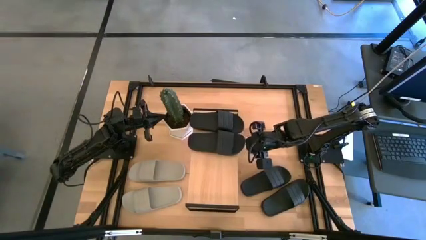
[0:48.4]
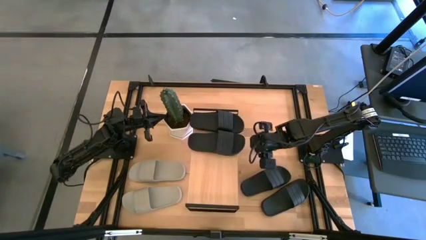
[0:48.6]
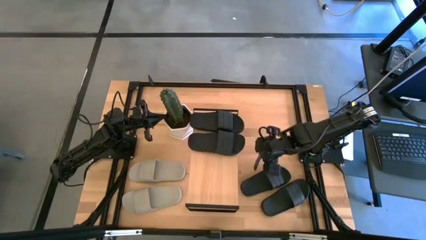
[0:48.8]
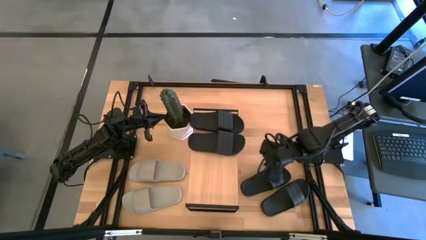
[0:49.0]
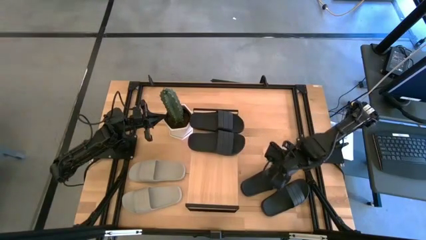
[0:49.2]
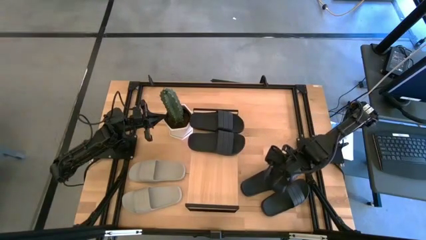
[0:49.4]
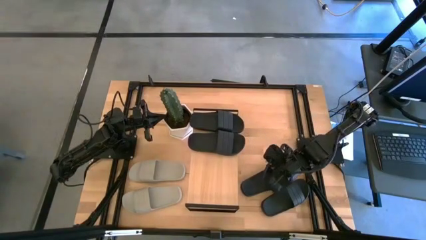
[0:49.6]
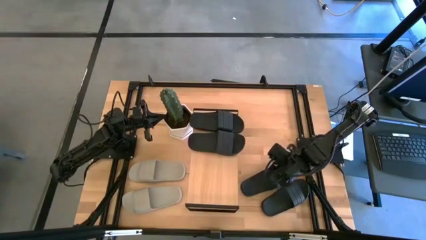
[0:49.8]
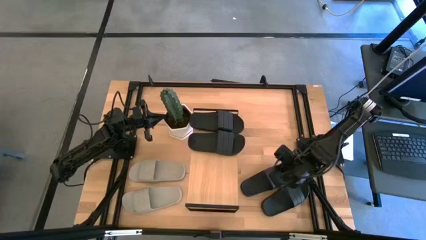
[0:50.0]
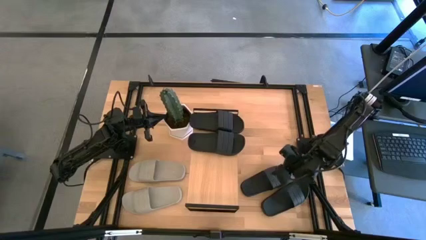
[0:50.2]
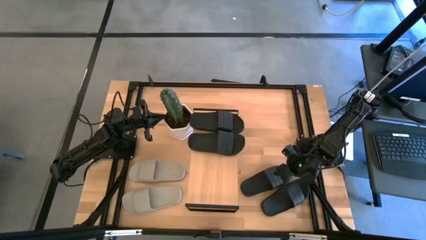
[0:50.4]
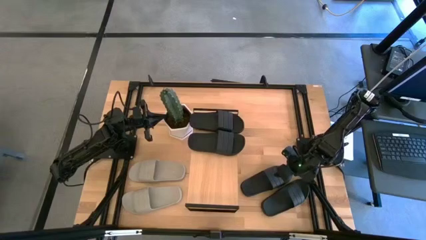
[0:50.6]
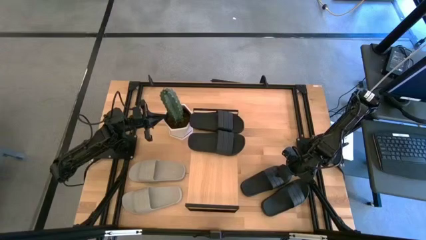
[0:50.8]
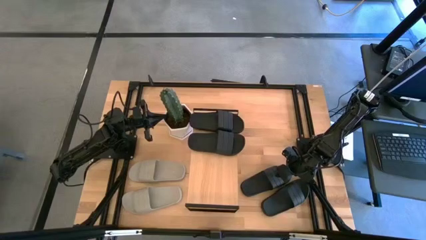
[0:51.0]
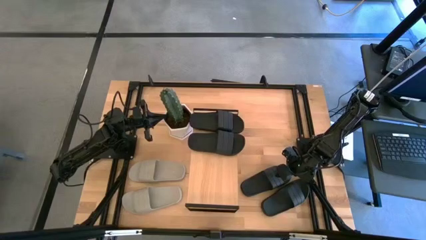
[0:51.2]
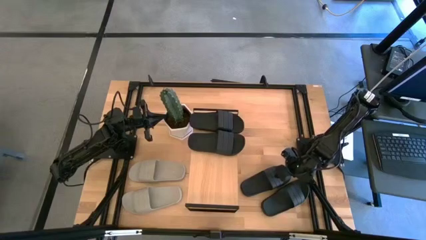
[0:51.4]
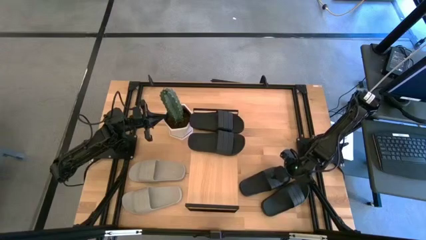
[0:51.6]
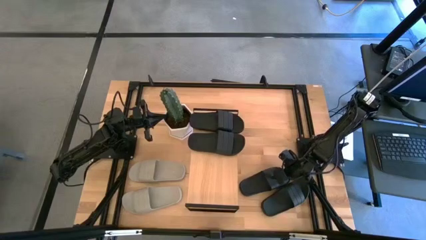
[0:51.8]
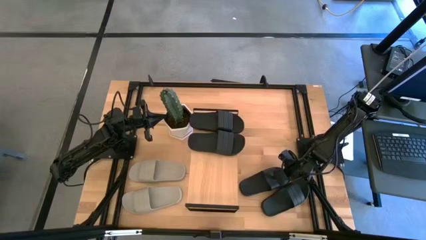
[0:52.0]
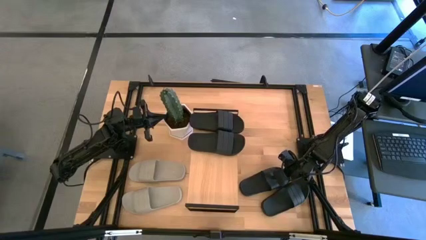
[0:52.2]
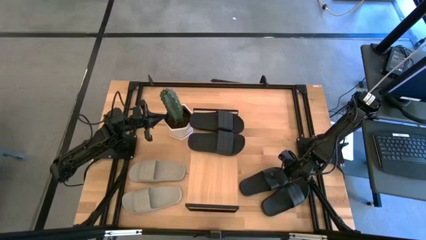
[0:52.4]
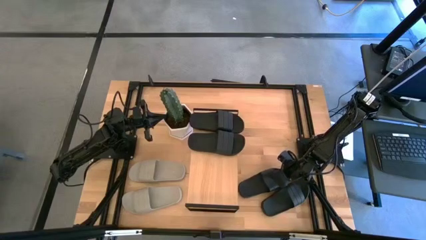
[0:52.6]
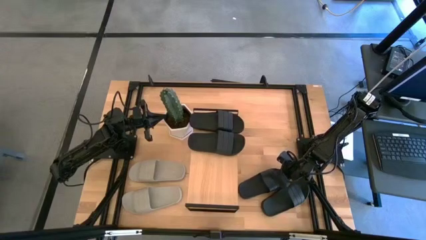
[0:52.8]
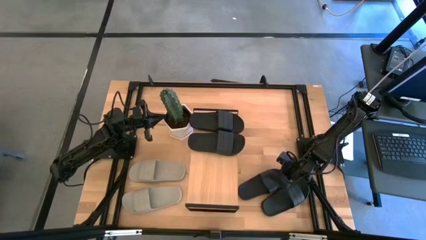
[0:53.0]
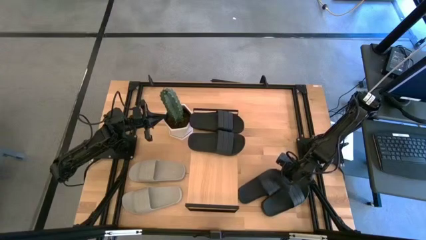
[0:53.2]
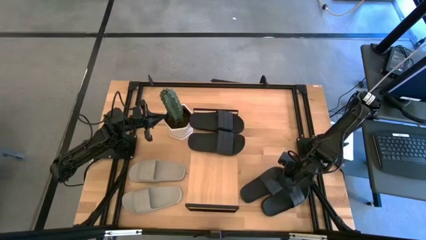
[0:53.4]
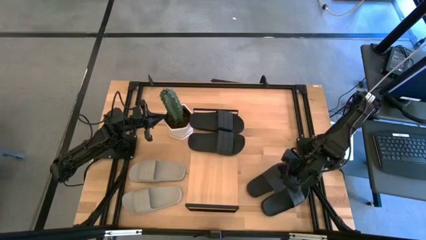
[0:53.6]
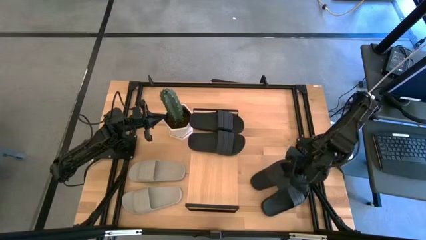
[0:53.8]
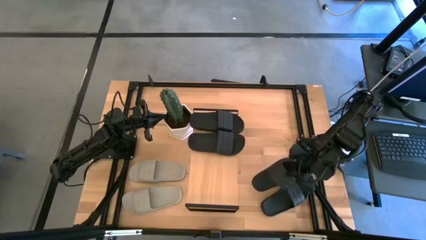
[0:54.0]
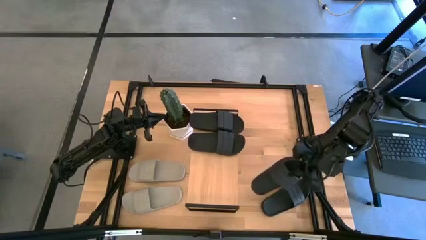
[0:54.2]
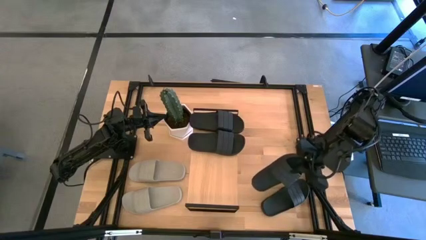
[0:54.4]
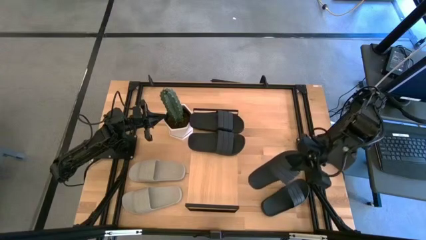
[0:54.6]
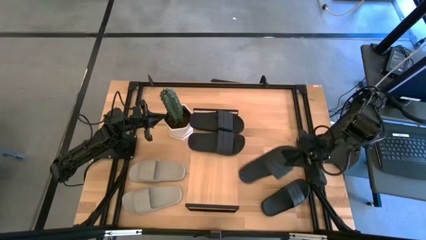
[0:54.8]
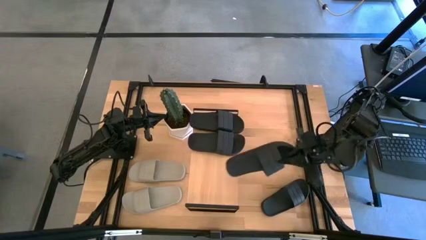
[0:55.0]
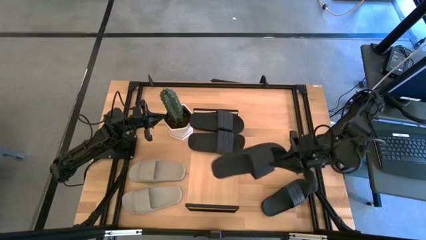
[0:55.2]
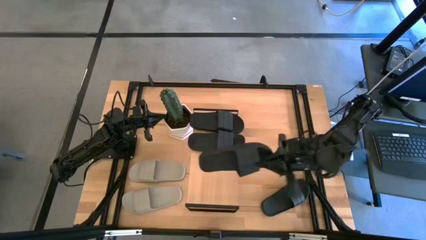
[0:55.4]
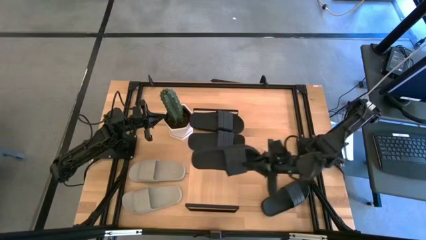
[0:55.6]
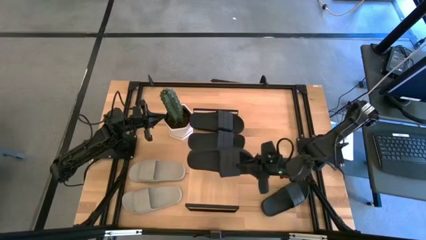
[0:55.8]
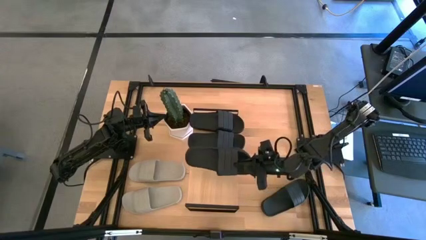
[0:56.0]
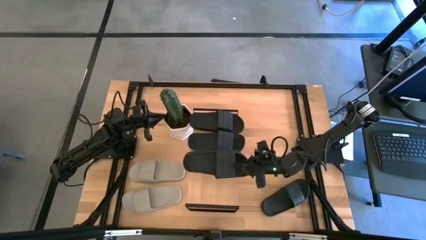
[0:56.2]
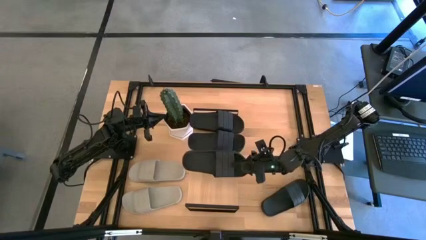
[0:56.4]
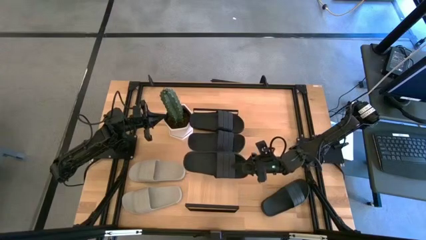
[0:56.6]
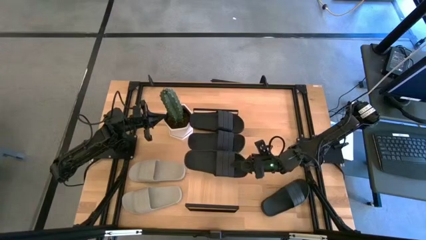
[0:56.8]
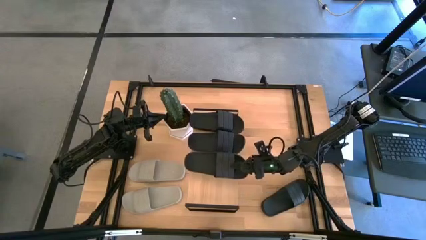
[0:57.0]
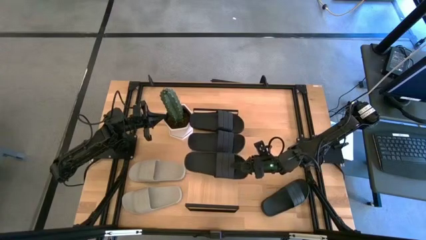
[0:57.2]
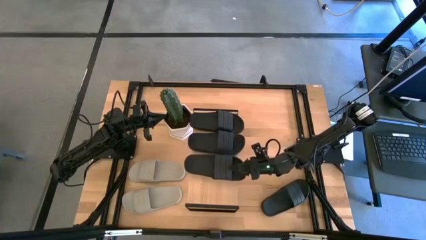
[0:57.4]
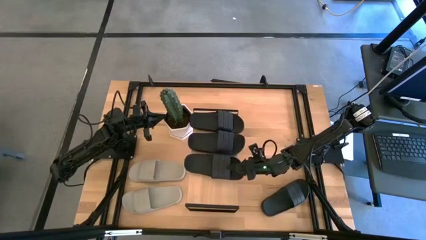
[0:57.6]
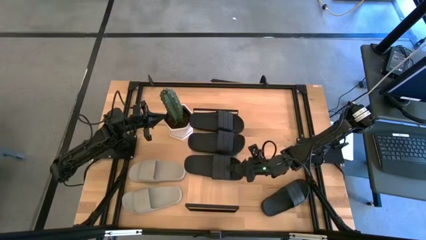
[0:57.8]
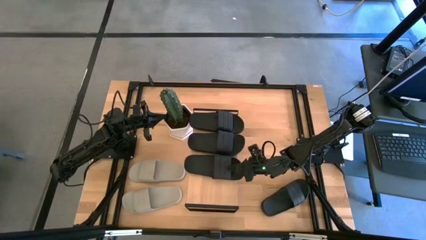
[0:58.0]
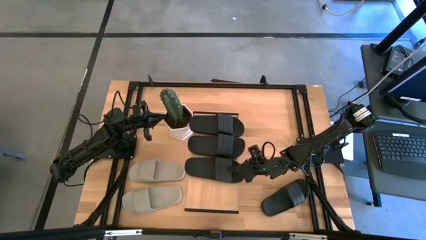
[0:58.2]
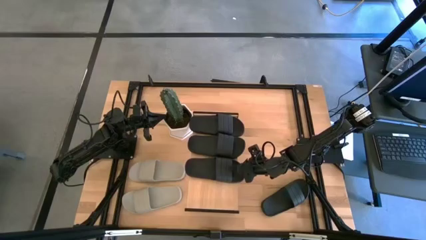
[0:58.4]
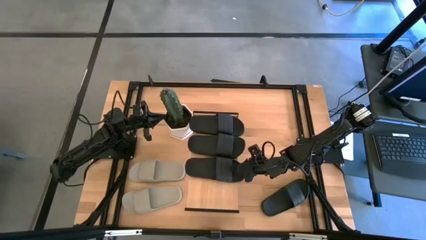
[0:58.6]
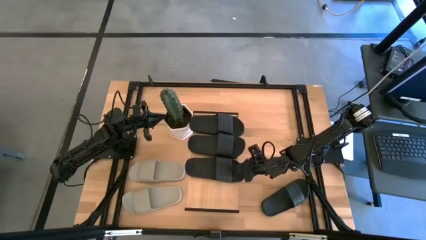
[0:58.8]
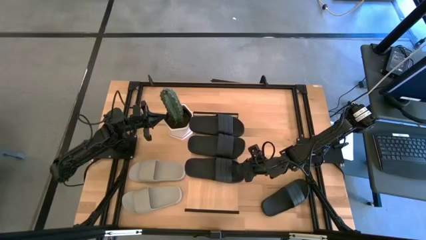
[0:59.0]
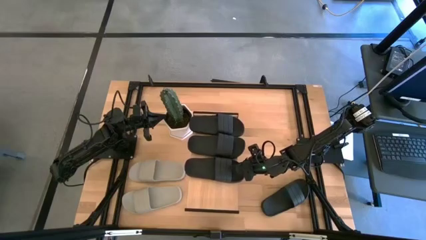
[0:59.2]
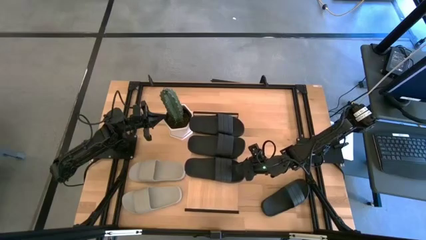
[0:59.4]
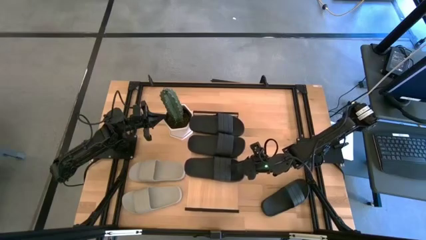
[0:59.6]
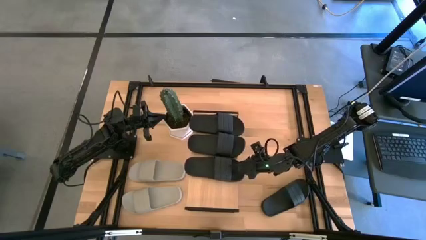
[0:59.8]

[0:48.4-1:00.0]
Task: Pick and place slides into the shelf
Put the black slide on the shelf

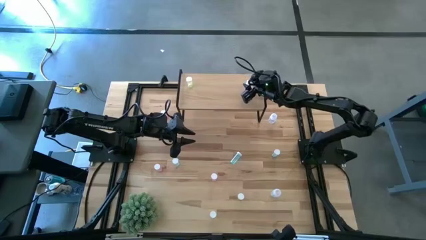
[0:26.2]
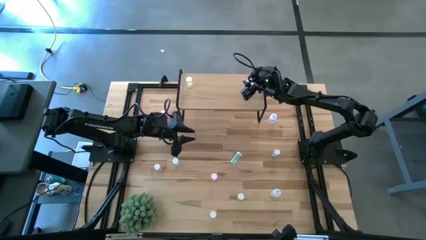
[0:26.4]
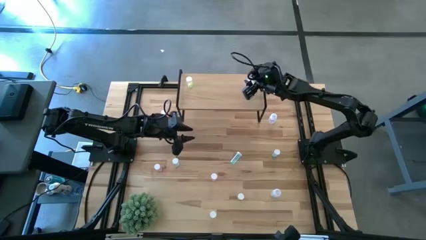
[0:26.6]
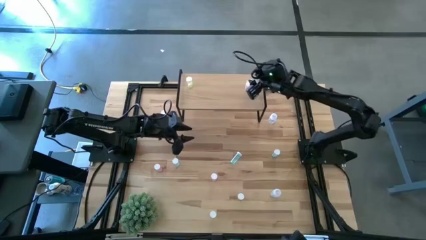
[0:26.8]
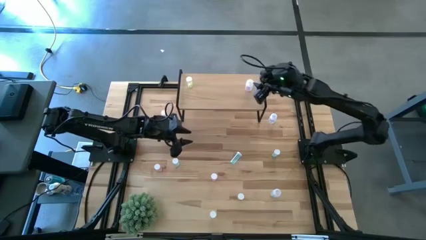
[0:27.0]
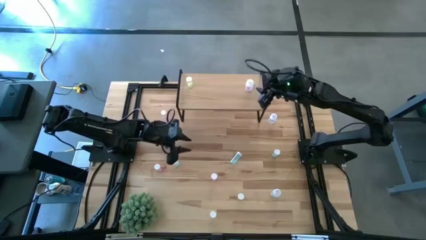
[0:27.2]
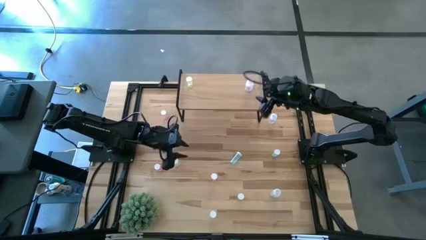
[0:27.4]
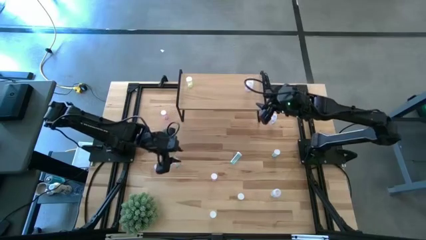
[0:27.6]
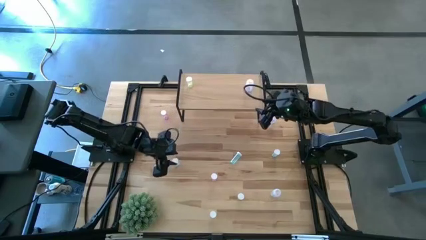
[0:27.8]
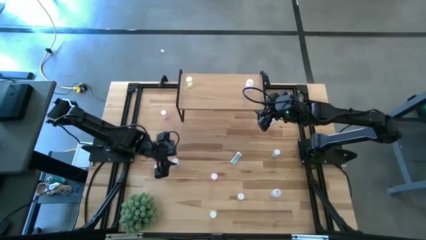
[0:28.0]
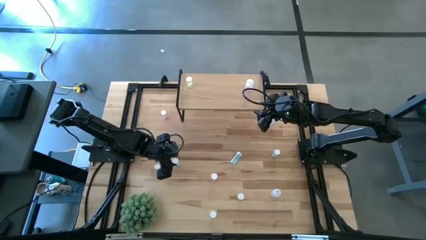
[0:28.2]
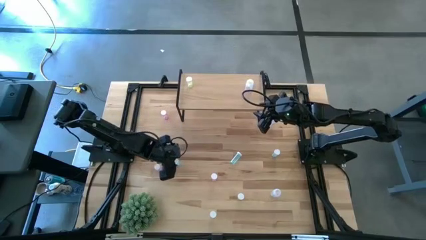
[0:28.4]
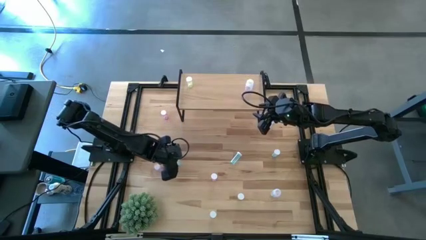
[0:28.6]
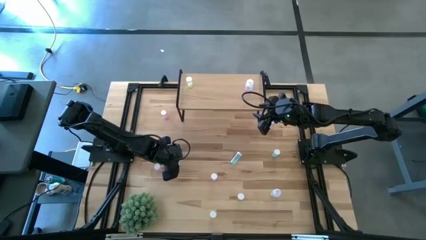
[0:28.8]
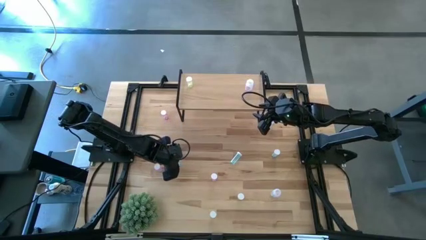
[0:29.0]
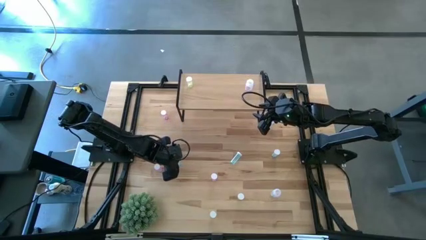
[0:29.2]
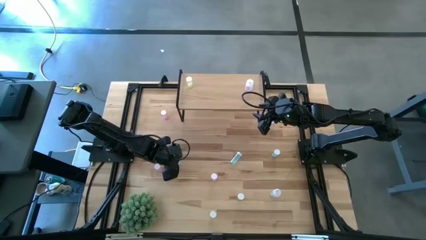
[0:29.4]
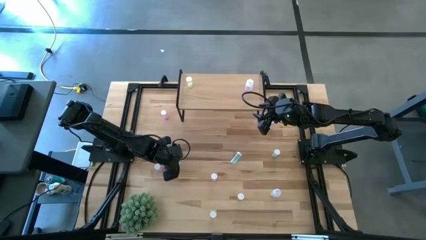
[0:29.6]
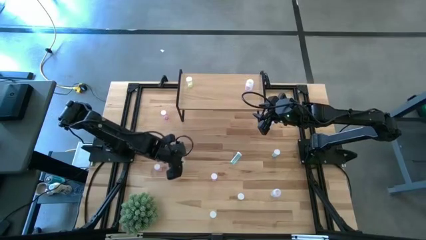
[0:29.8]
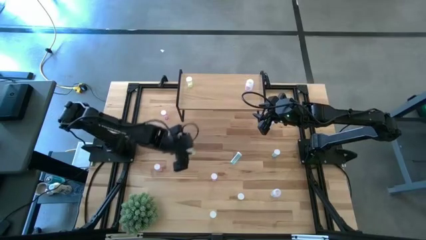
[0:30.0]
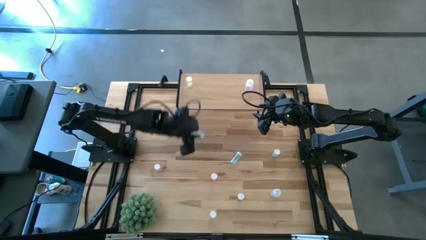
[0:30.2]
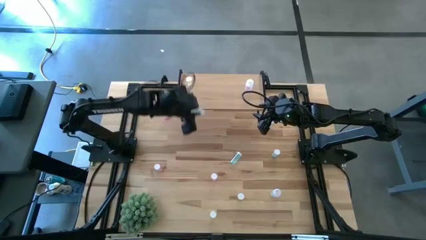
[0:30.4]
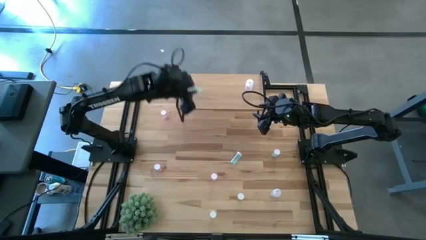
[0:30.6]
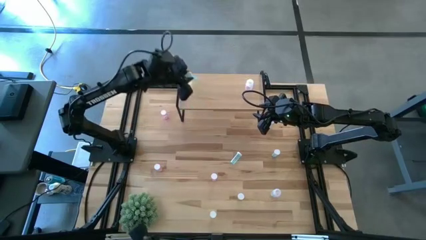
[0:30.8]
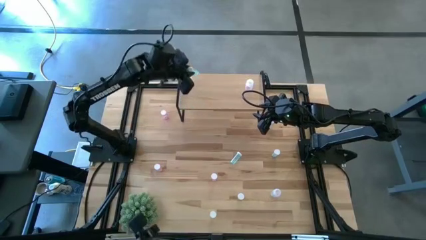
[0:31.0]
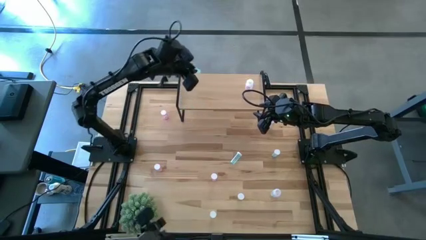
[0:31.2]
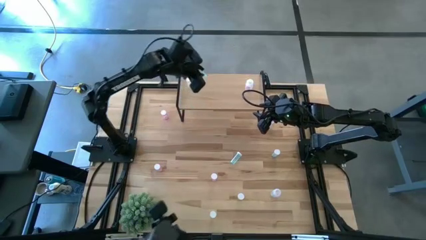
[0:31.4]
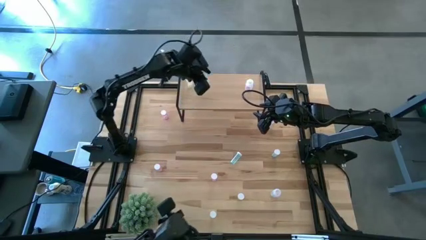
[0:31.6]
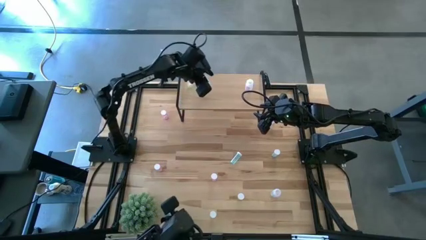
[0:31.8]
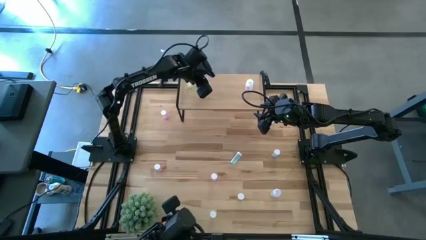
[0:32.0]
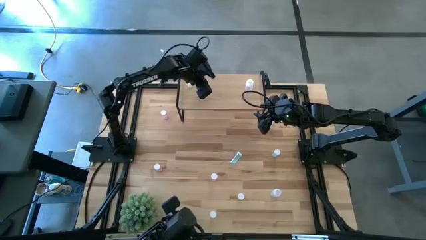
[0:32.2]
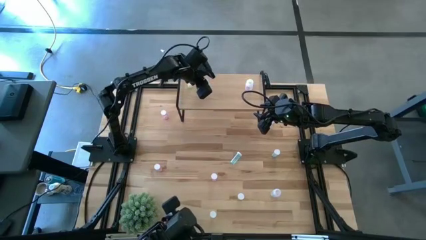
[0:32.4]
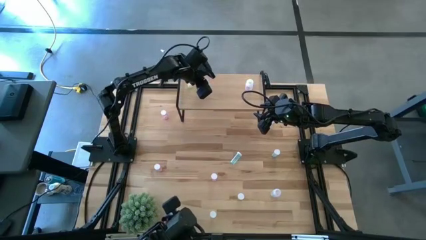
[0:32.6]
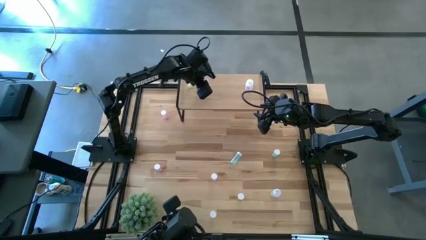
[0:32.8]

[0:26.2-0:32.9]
Task: Pick and place medicine bottles onto shelf by color
Put the left blue pill bottle on the shelf
